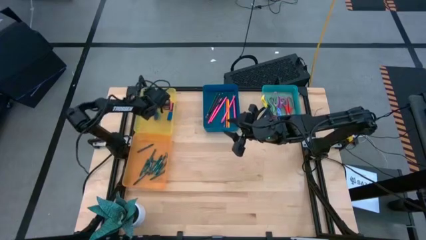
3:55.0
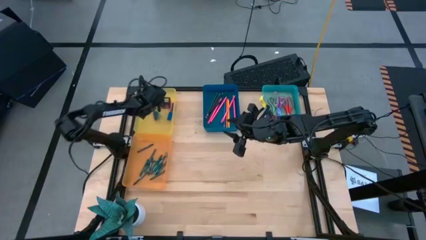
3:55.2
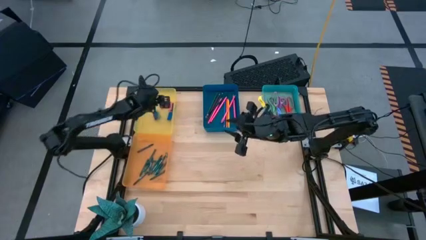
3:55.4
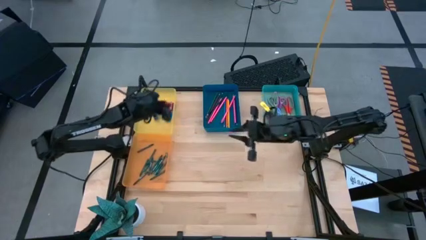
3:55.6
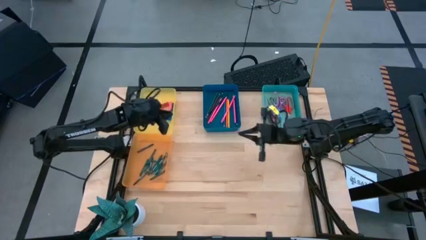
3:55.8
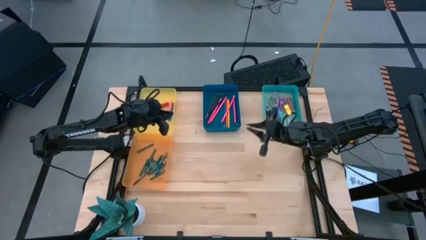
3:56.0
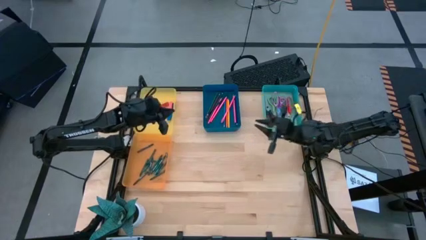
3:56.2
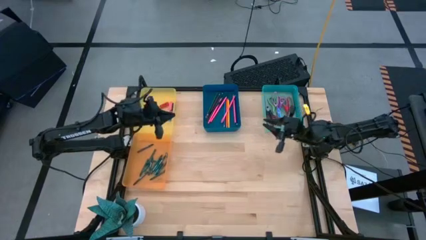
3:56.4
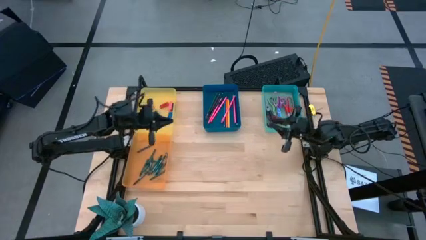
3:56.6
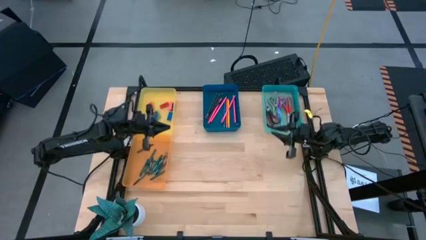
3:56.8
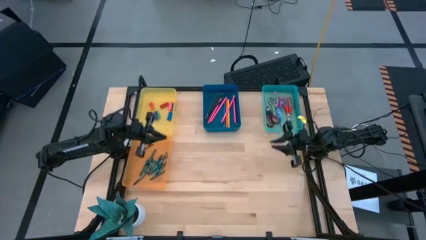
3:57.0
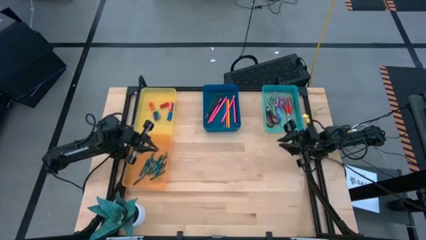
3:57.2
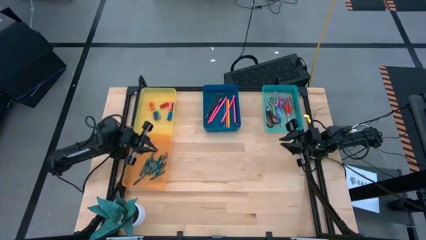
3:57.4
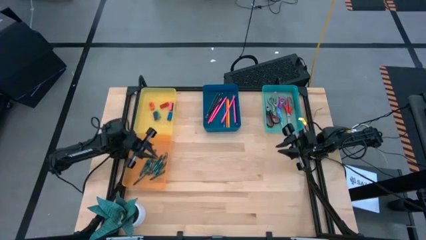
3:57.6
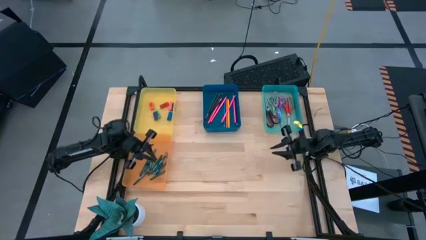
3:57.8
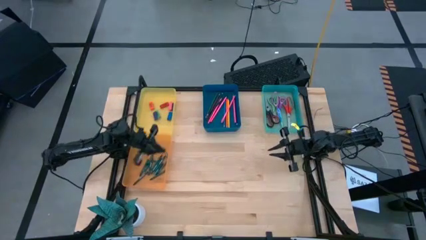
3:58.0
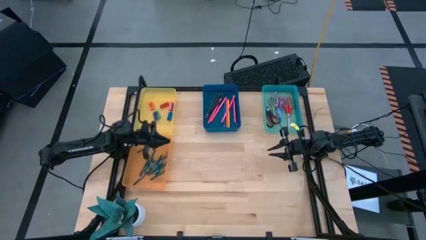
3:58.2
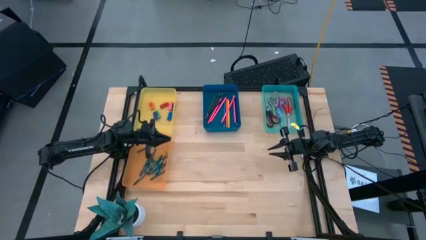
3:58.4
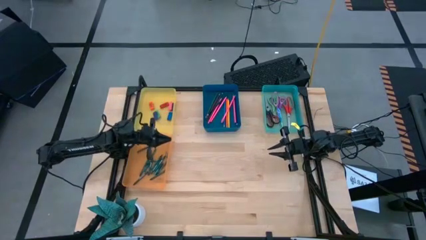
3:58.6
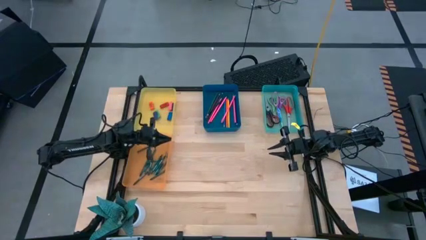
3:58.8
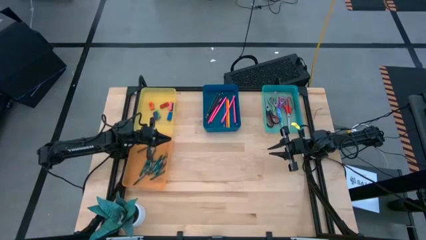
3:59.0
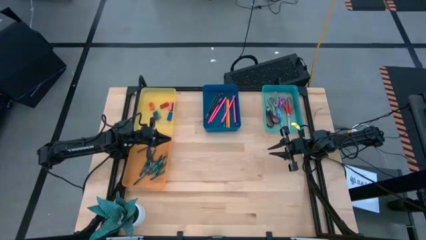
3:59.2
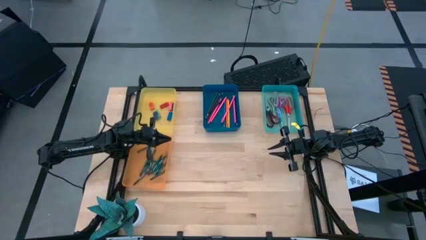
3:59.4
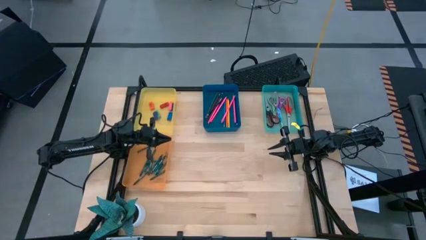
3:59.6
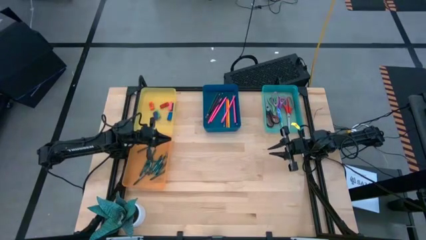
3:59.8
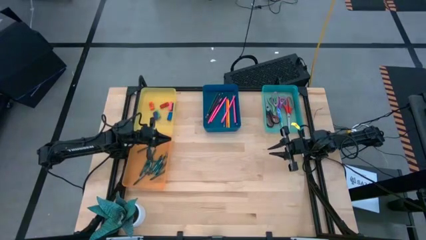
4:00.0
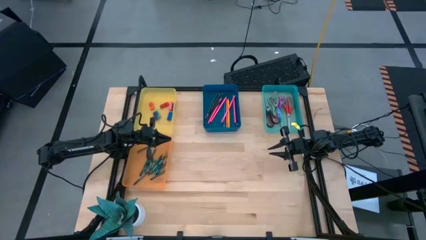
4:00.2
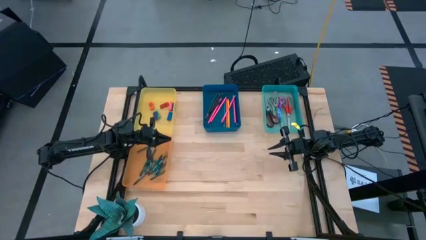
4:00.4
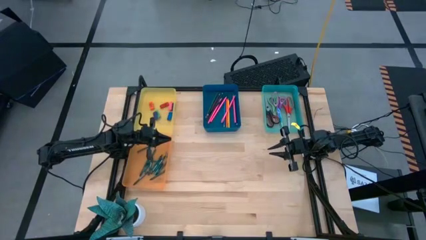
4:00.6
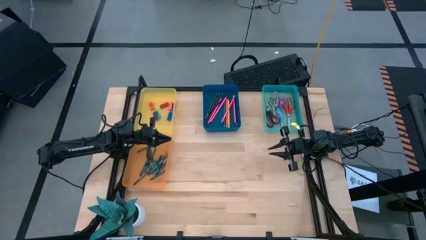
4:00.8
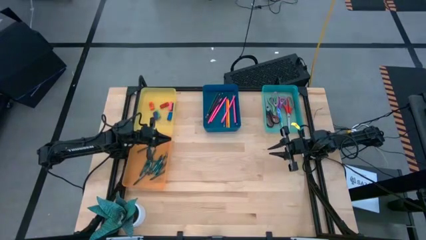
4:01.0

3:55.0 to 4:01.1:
Task: Sort crayons/erasers/pens/pencils in bins
Return to Home Position

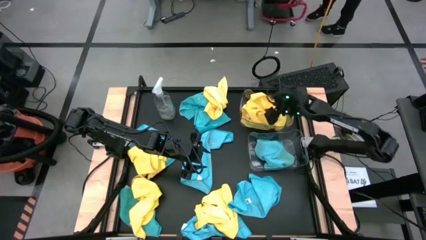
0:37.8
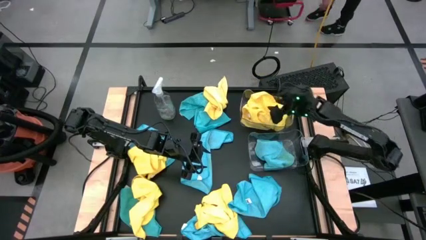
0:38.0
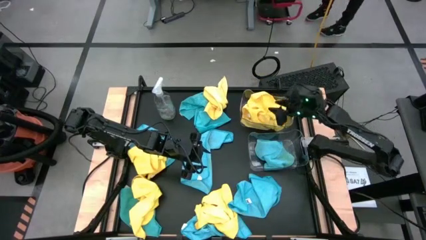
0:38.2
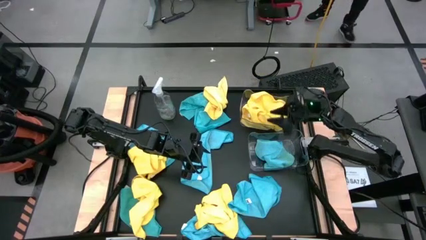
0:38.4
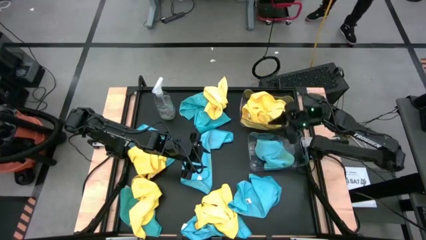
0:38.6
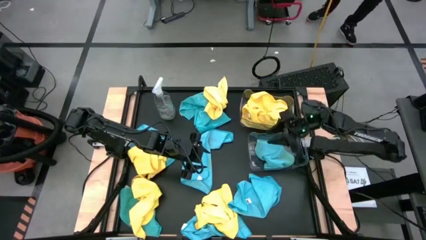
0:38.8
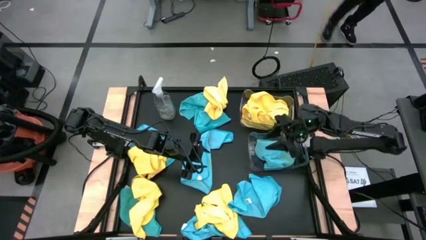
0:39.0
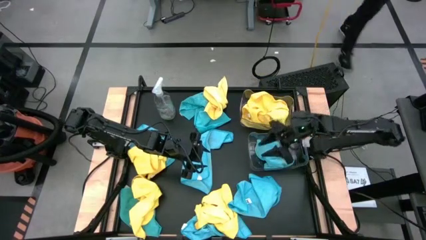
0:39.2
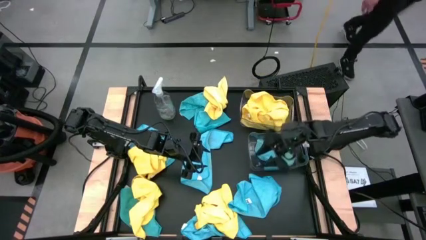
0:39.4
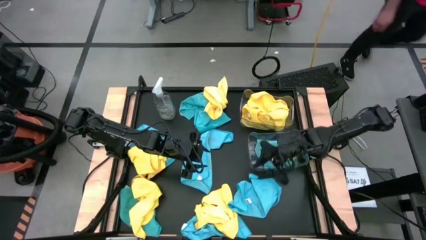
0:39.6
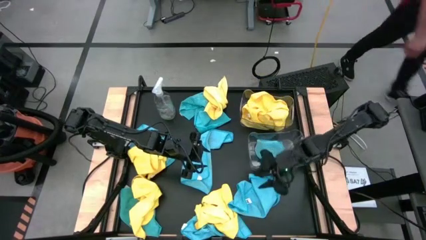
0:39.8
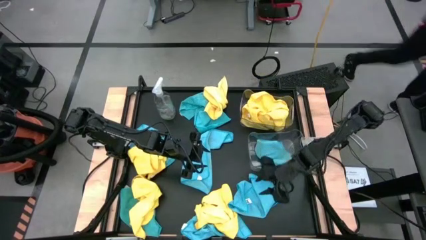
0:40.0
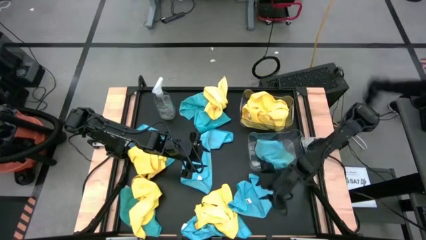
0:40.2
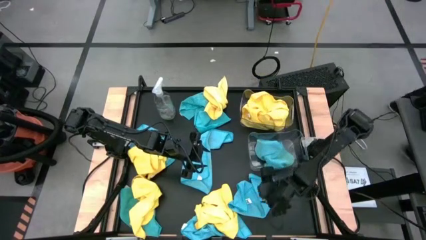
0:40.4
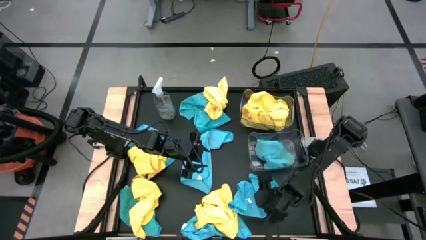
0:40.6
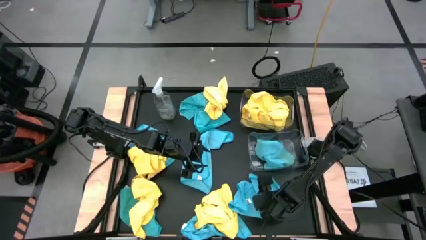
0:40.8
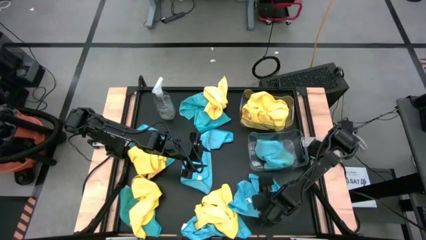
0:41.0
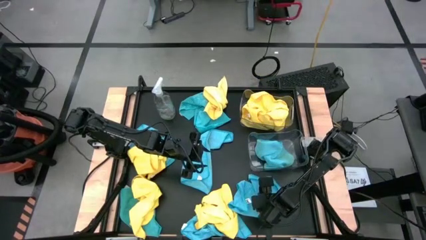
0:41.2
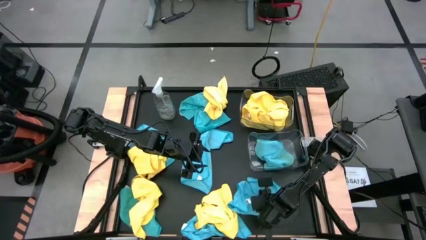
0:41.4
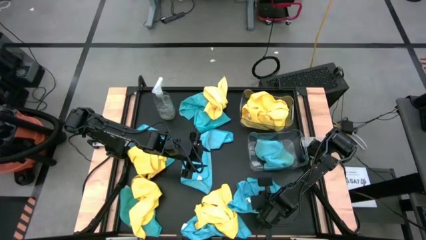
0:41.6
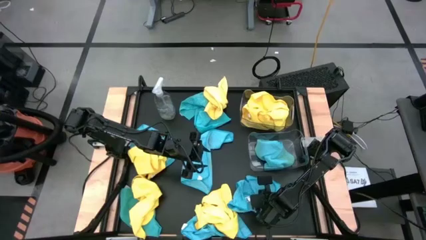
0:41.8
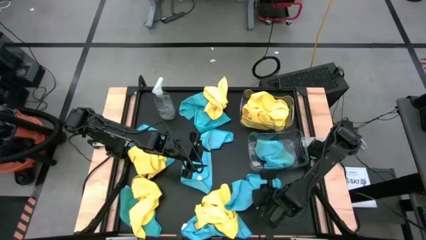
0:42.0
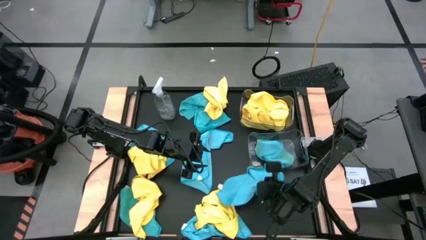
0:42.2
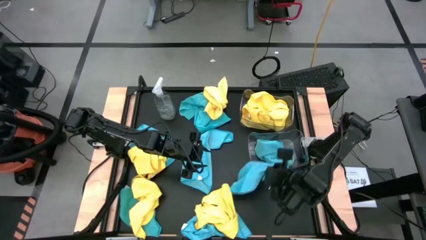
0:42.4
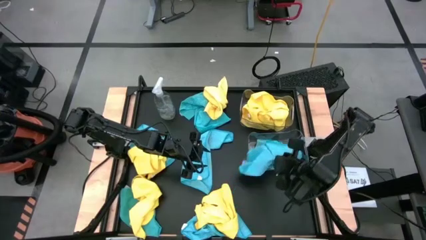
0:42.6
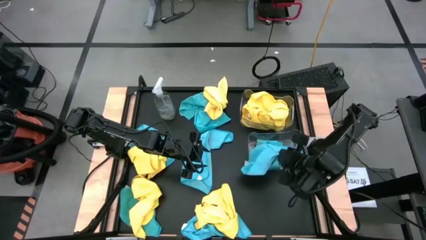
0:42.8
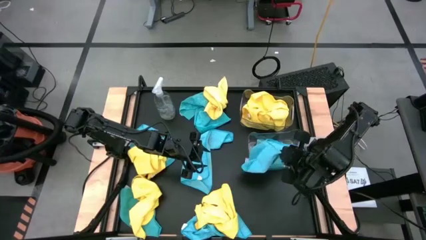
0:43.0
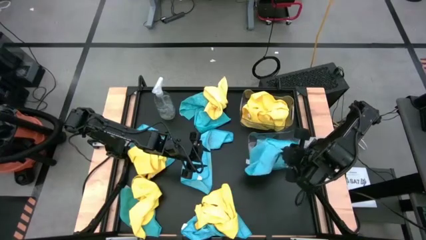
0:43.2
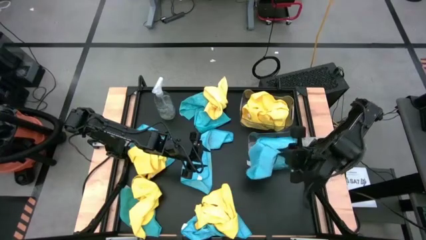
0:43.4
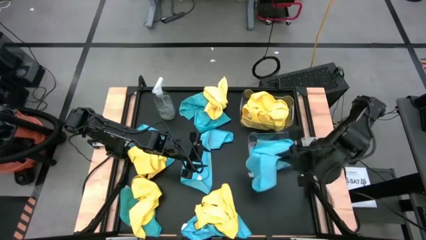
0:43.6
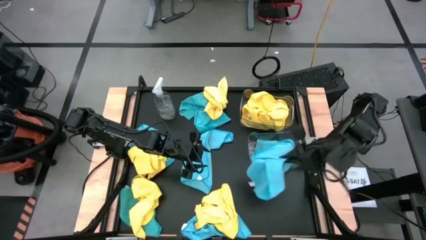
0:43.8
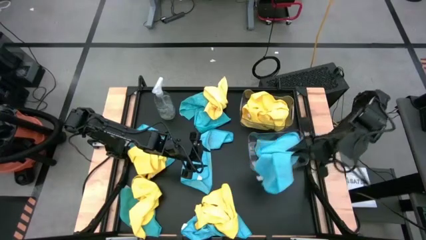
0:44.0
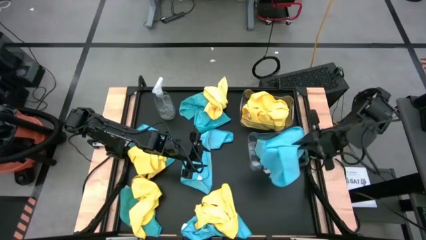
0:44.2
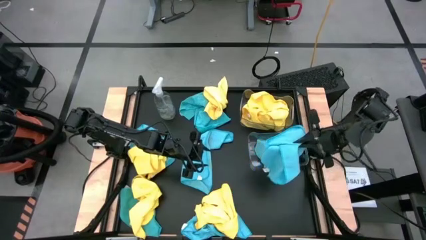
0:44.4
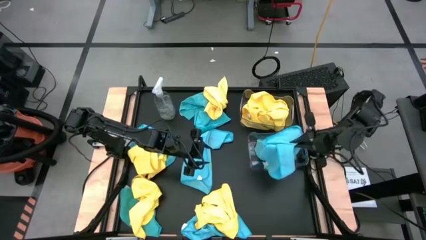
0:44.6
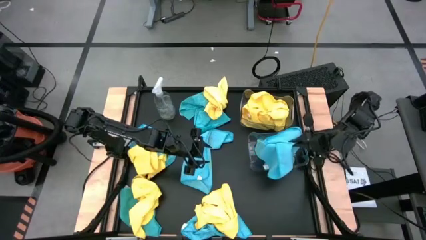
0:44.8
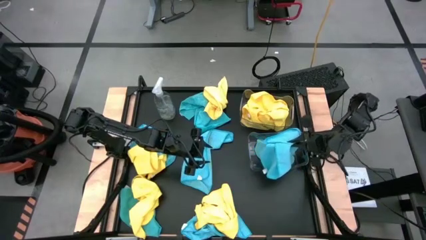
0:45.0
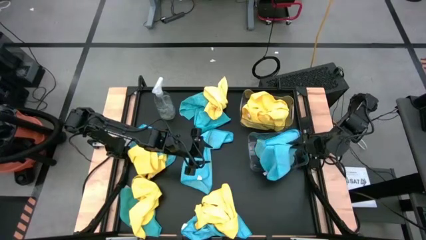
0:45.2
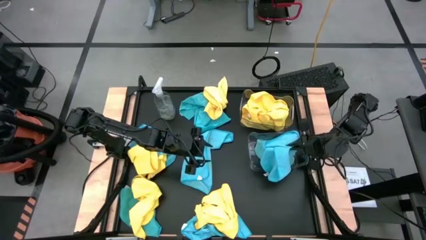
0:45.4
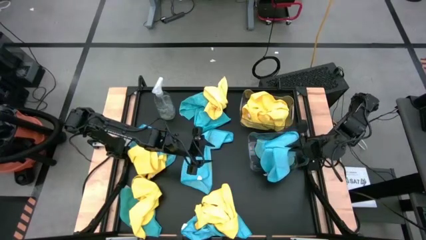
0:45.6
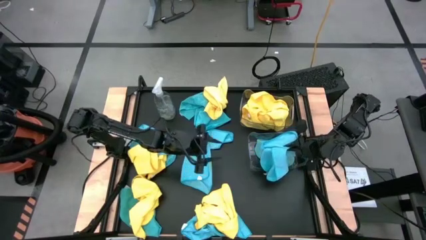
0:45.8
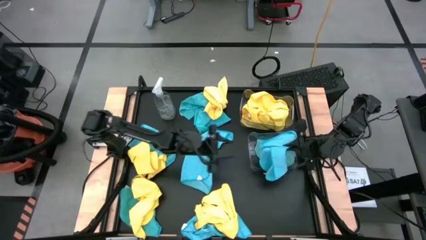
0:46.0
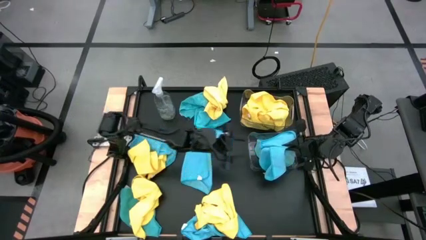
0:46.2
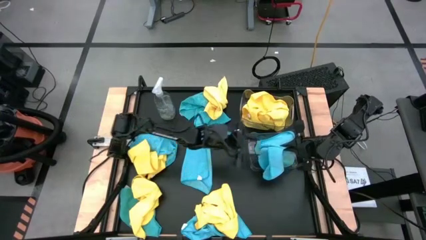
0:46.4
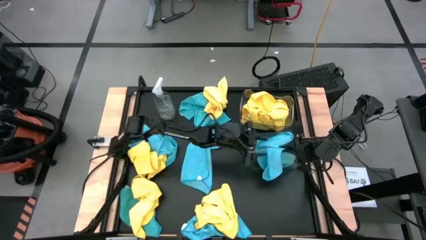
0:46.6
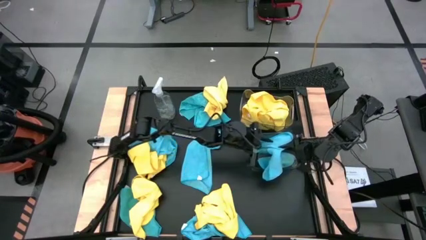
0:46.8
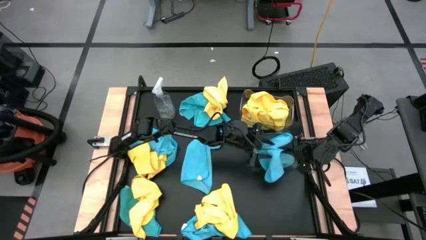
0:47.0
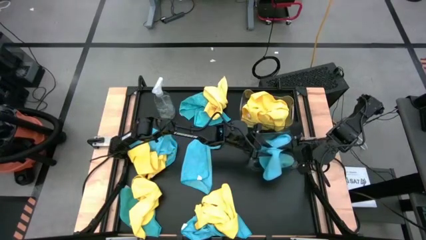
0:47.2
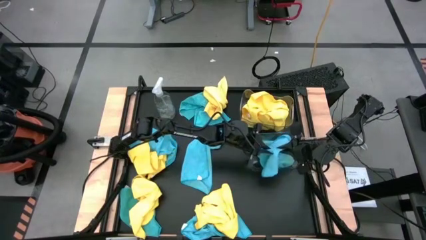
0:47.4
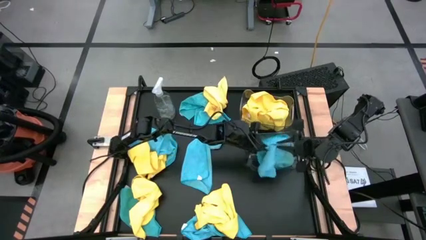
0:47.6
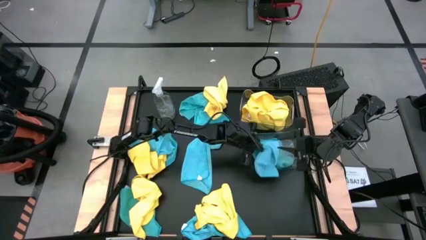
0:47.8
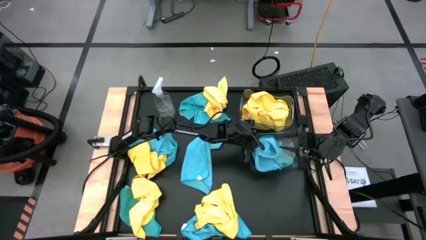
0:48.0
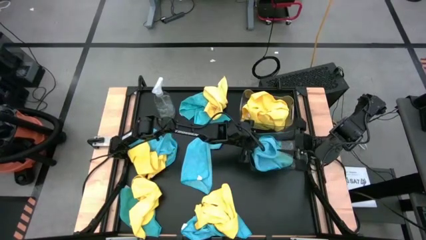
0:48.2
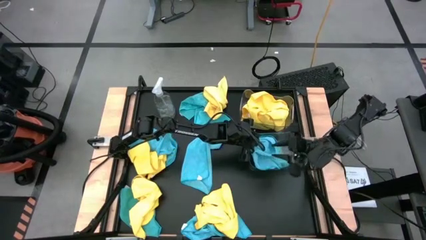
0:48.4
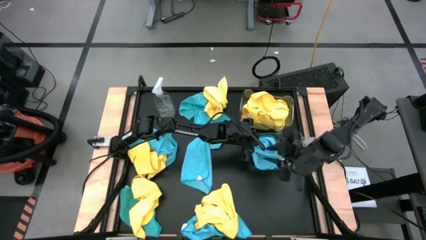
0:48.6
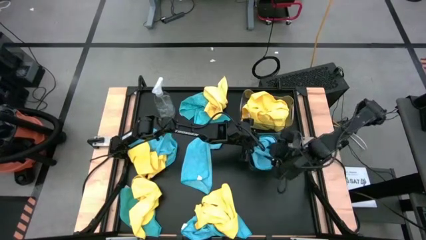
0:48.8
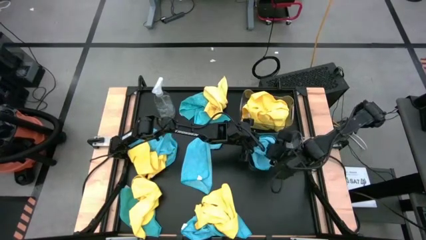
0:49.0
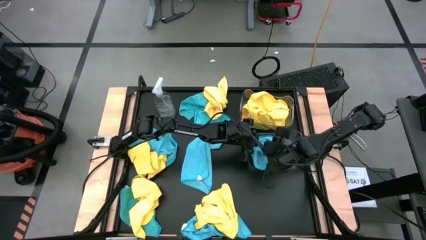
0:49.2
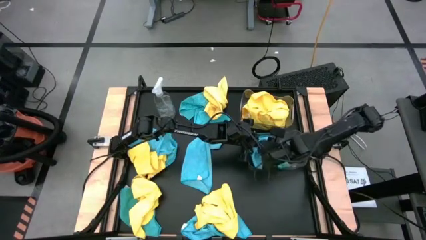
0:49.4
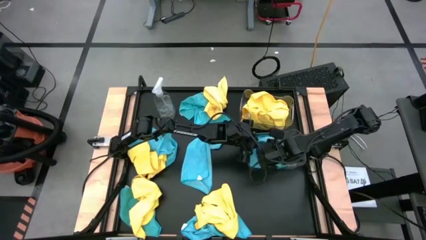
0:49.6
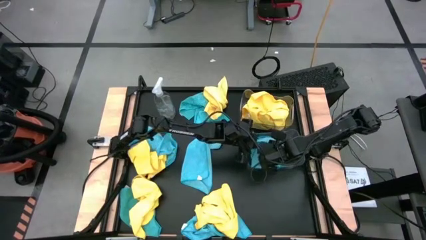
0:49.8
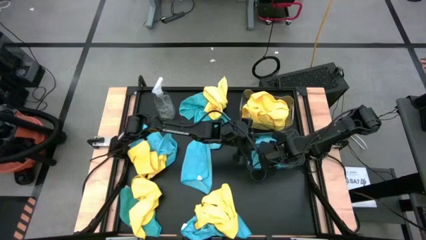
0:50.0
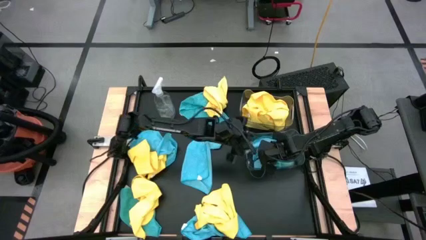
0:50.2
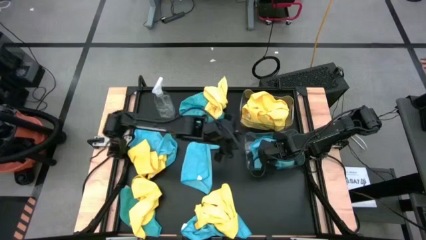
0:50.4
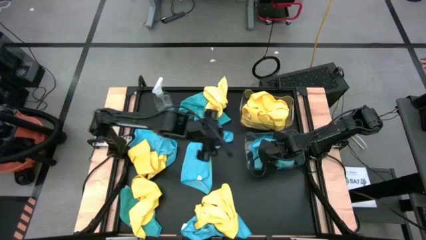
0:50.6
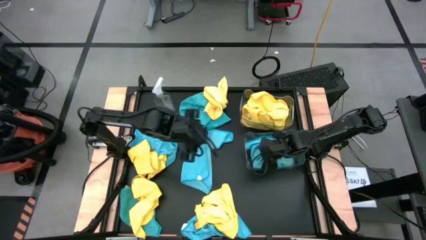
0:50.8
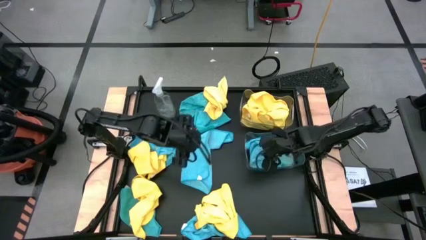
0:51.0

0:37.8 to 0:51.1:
Task: Sort microfiber towel by color & place in baskets
Put the blue microfiber towel into the bottom transparent bin
